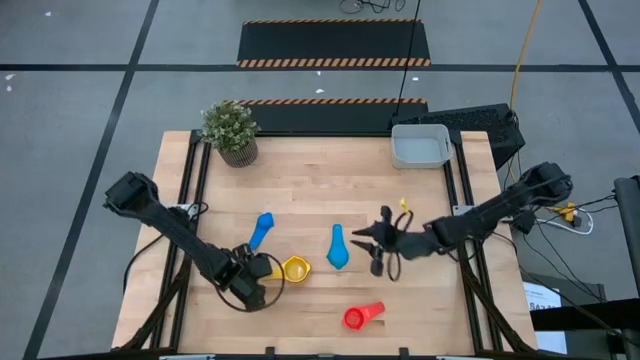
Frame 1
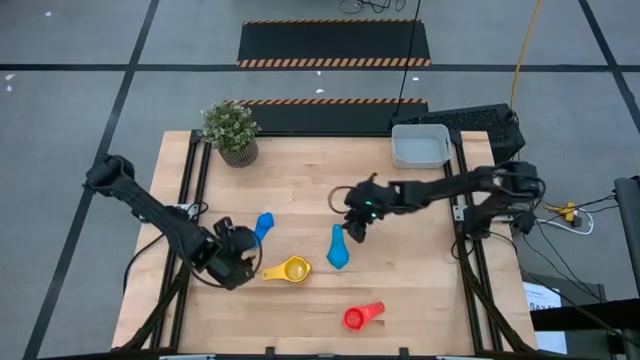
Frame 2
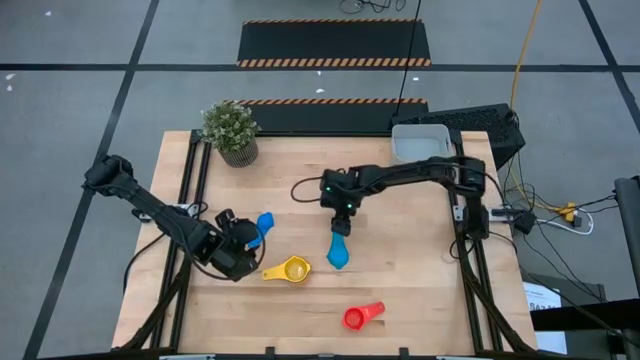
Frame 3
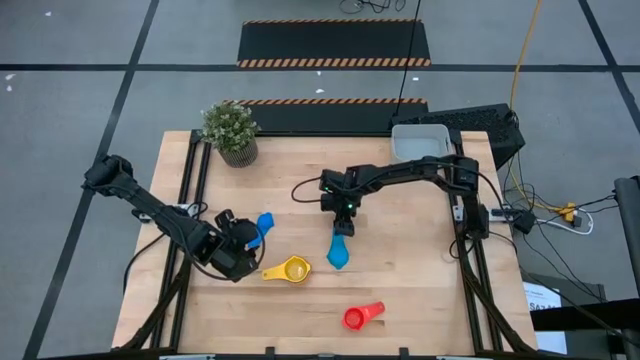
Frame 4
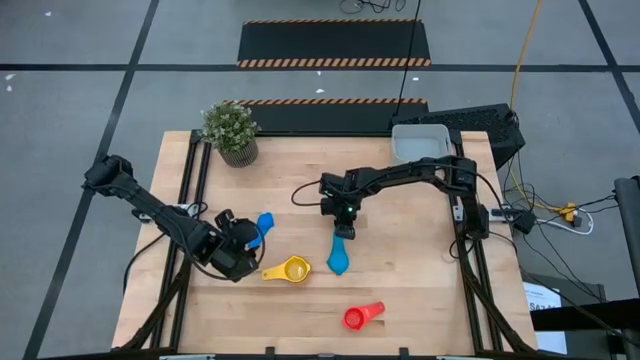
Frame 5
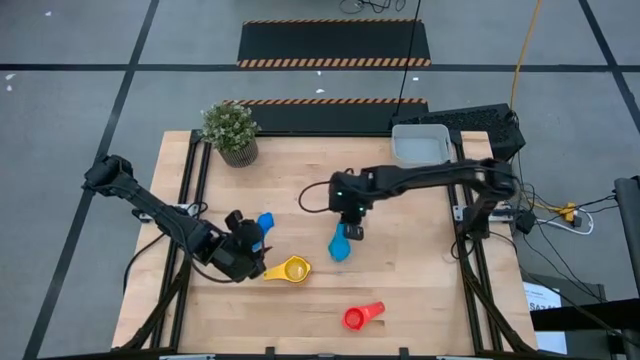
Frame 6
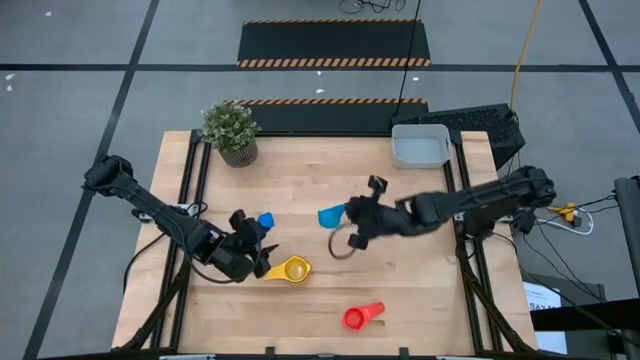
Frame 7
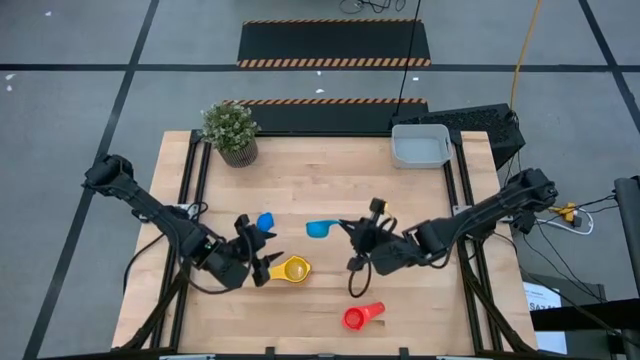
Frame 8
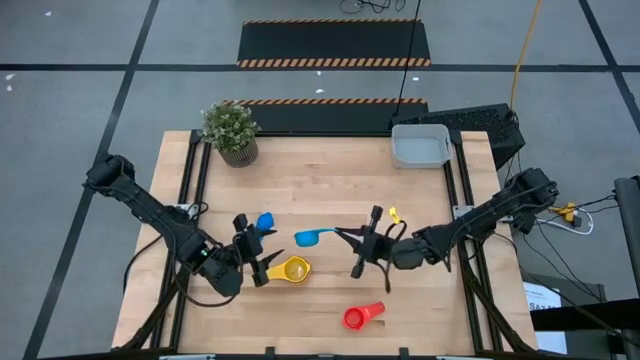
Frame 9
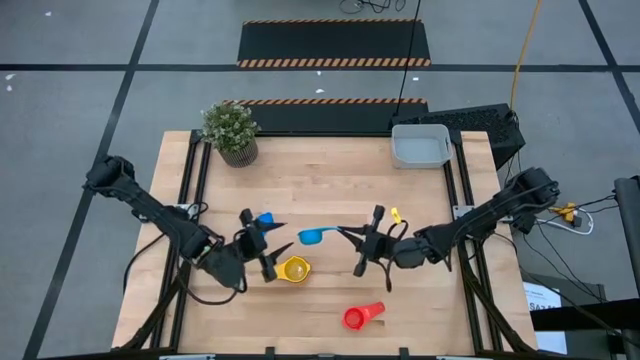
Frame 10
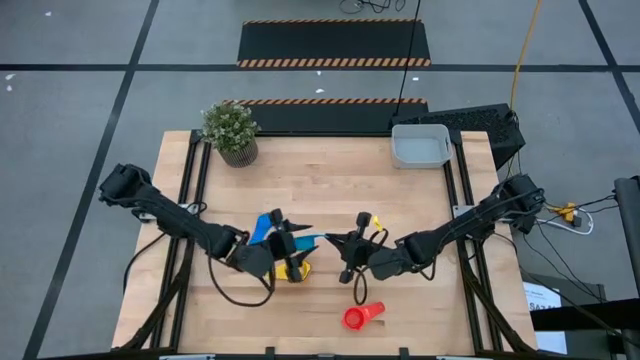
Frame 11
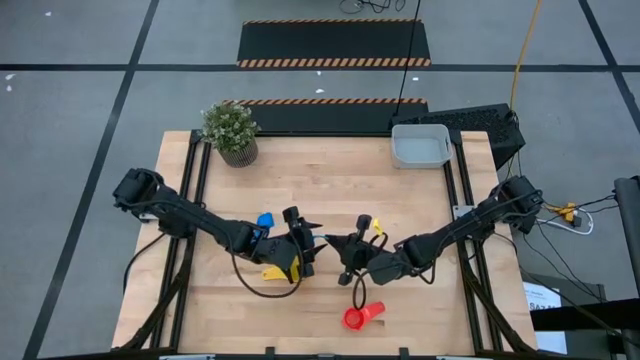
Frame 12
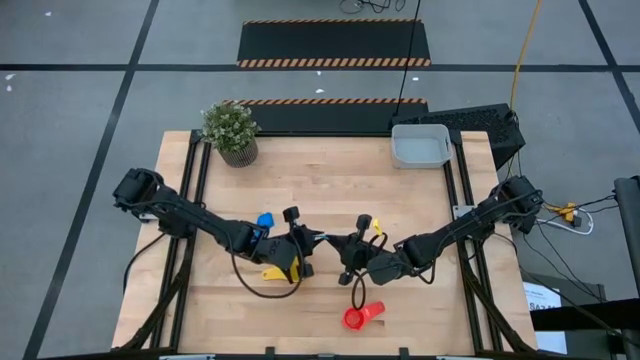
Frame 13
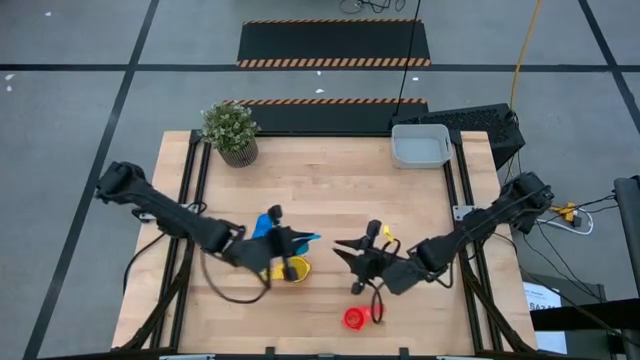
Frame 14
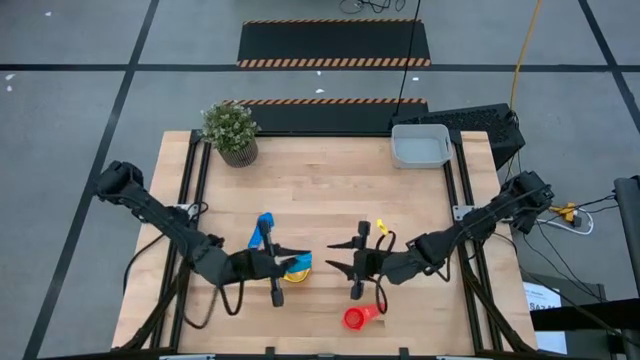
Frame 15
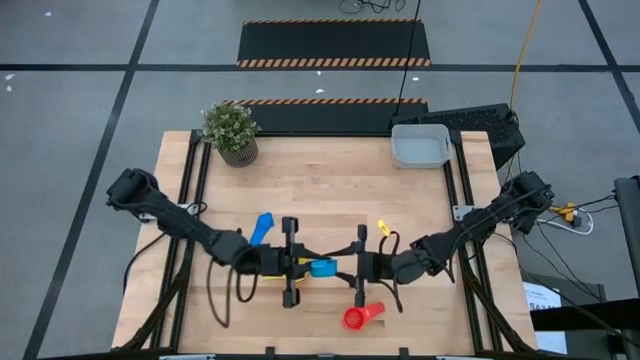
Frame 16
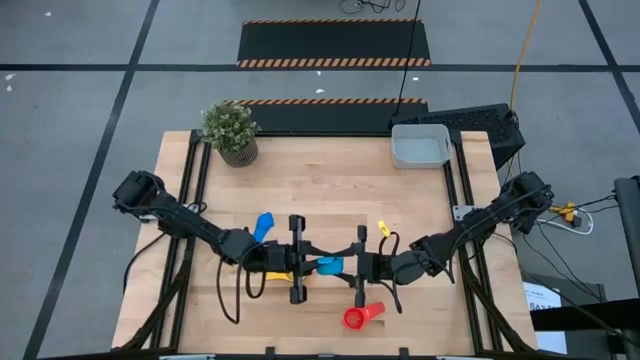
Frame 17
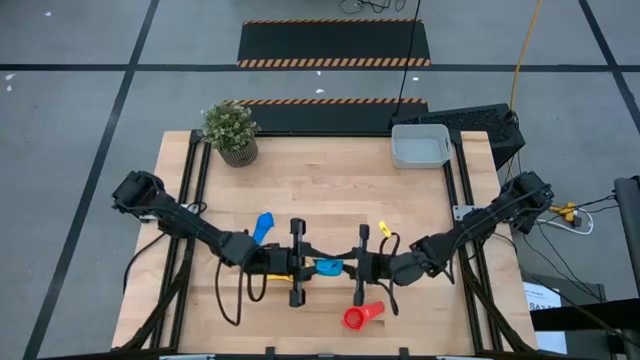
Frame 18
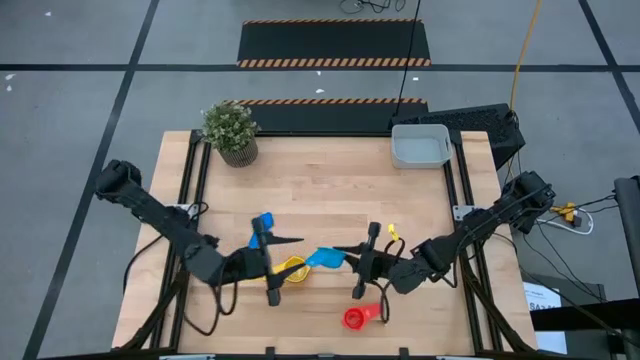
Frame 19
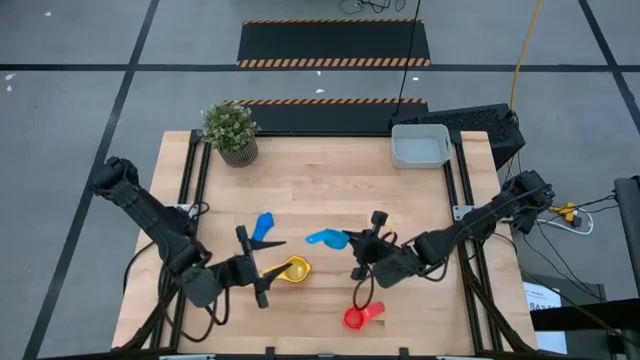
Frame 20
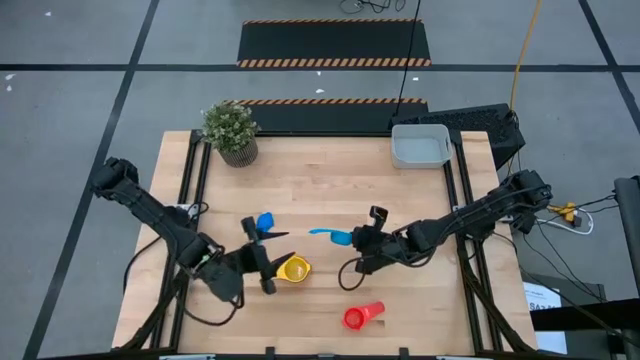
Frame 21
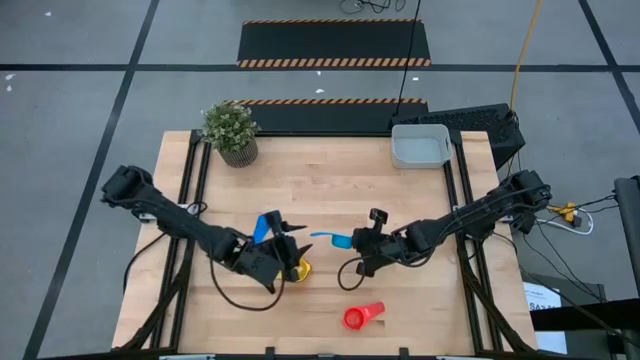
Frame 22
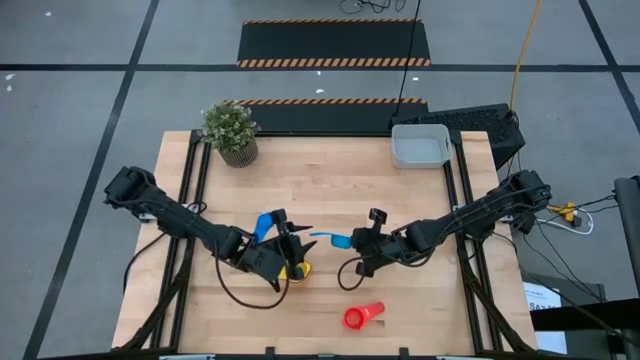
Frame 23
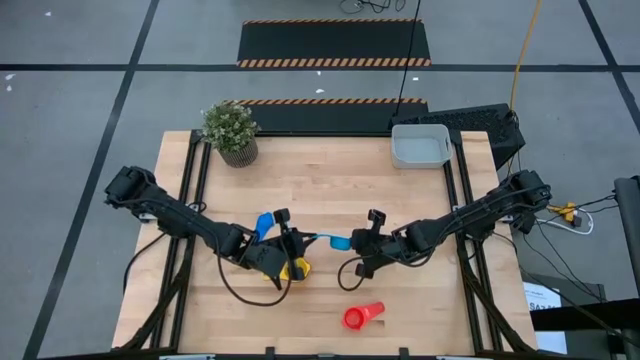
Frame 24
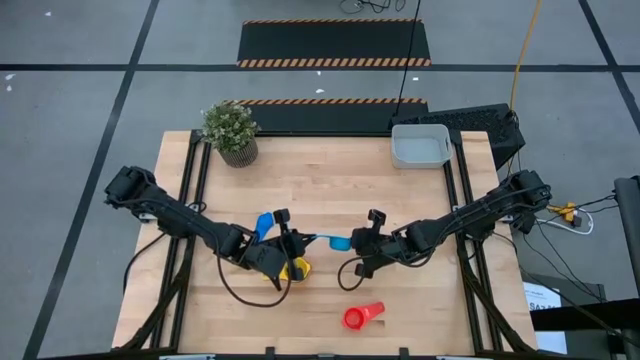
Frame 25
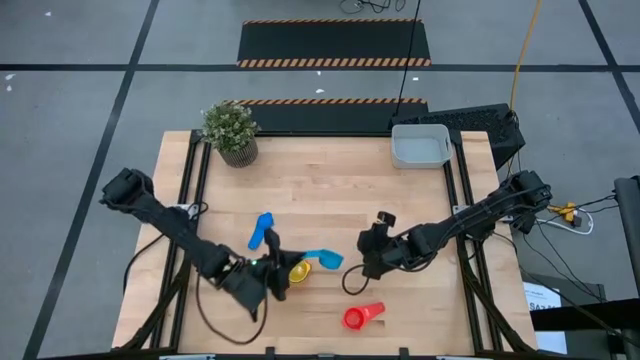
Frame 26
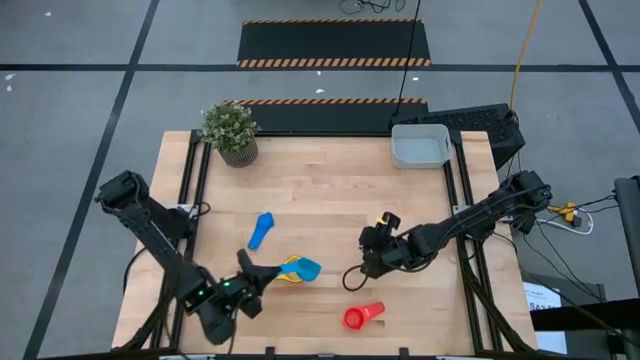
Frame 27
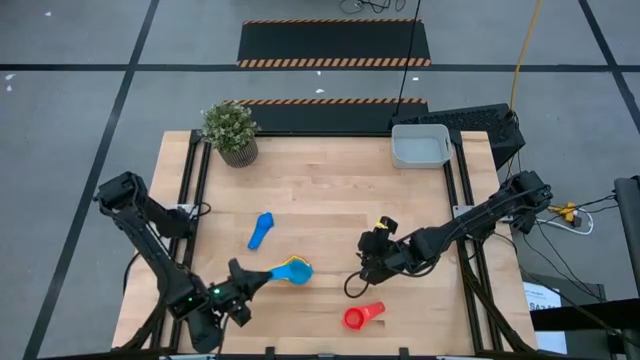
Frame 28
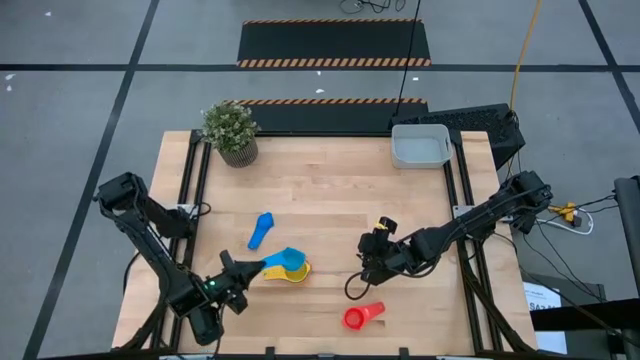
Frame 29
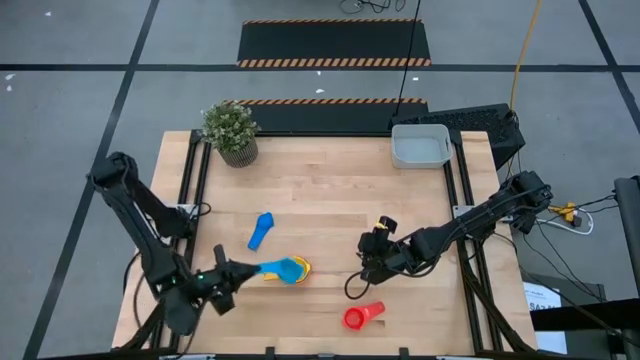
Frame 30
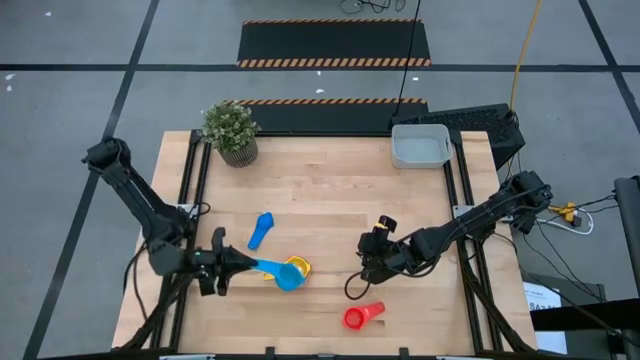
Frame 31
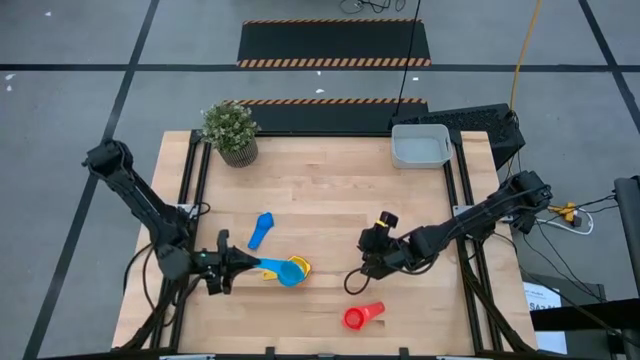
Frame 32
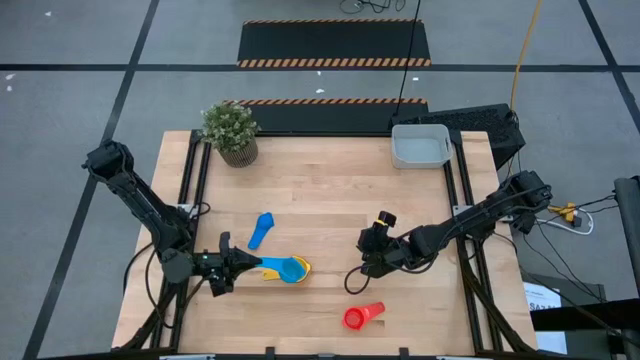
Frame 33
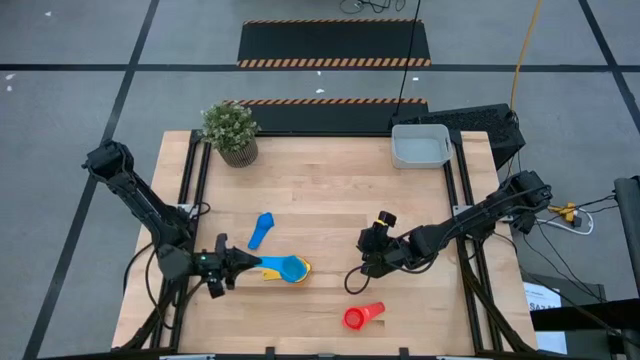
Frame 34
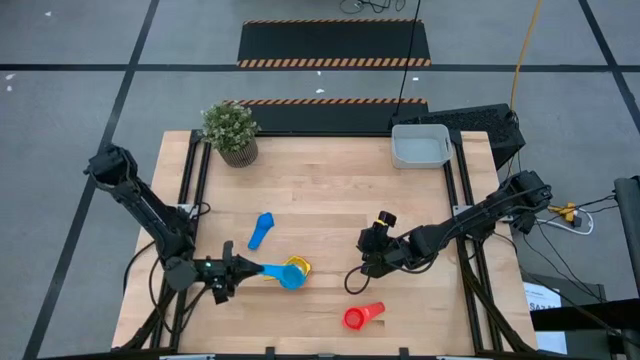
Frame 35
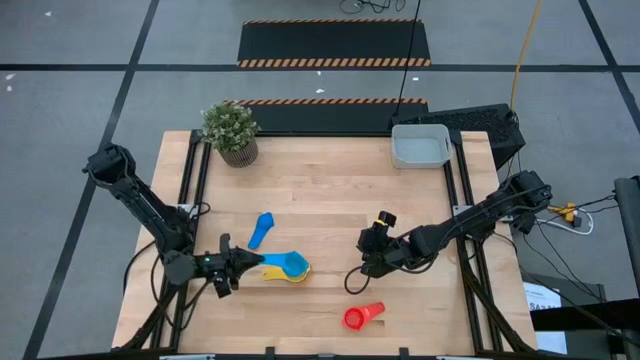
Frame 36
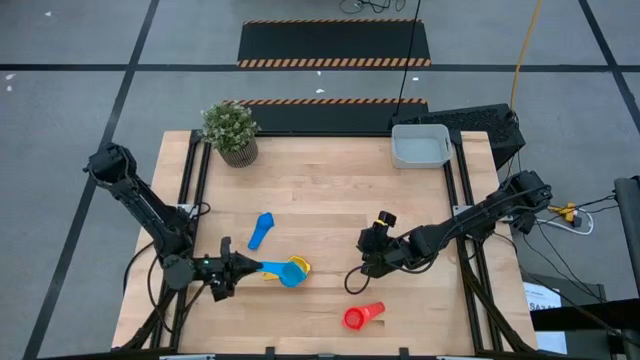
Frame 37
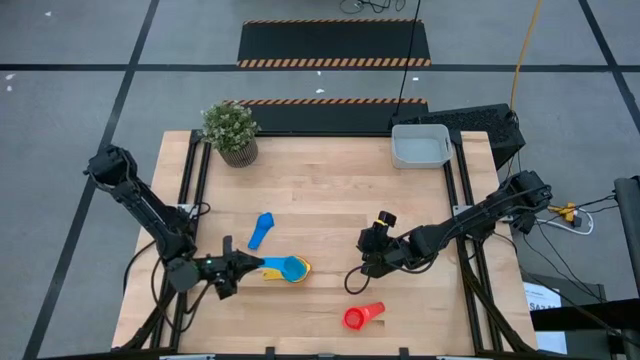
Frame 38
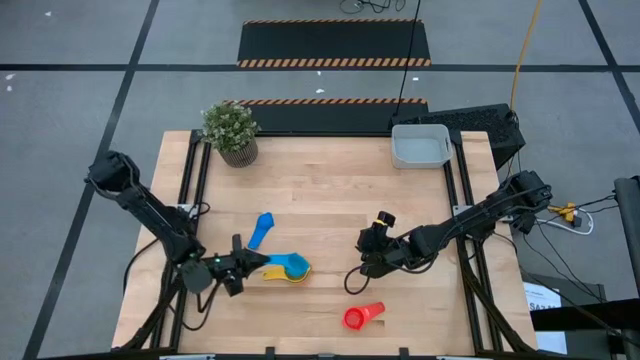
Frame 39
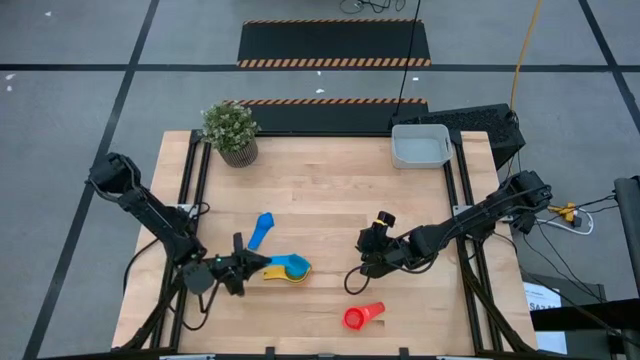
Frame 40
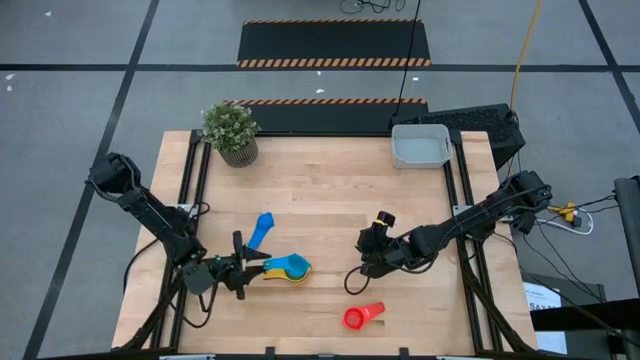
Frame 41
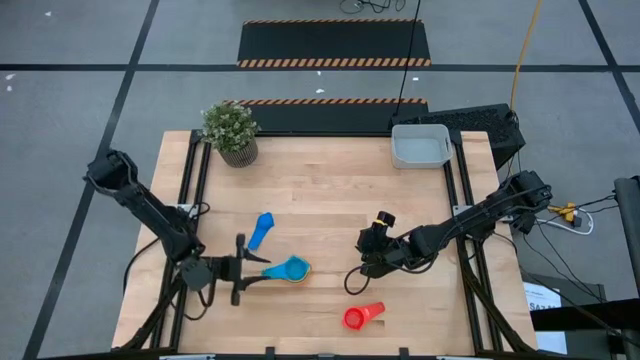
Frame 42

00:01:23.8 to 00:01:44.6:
Task: Nest measuring cups in basket
Stack the right light blue measuring cup on the yellow measuring cup

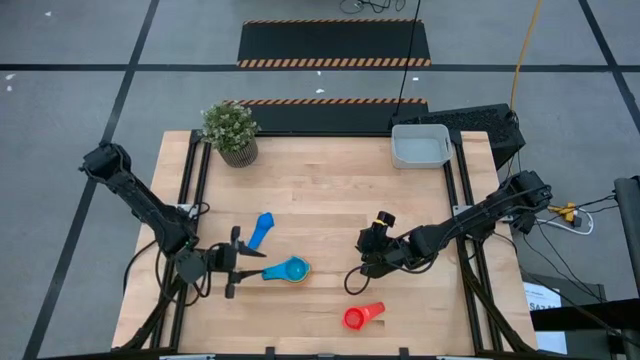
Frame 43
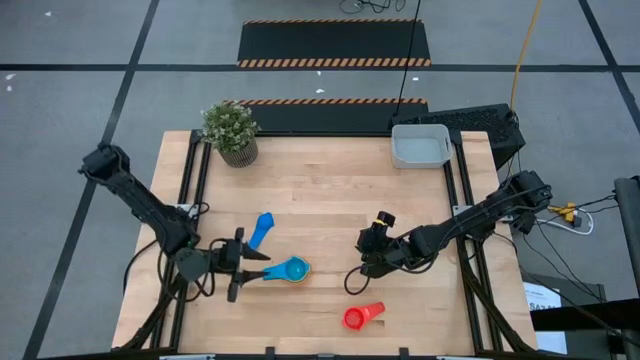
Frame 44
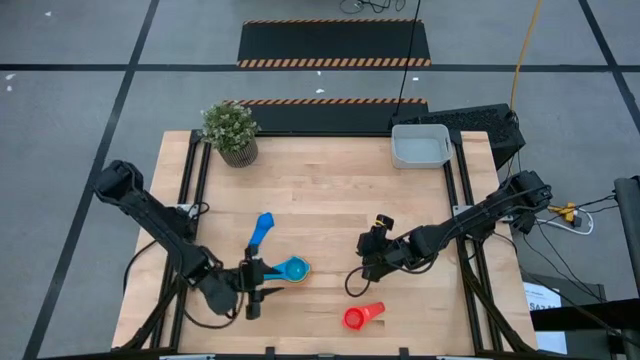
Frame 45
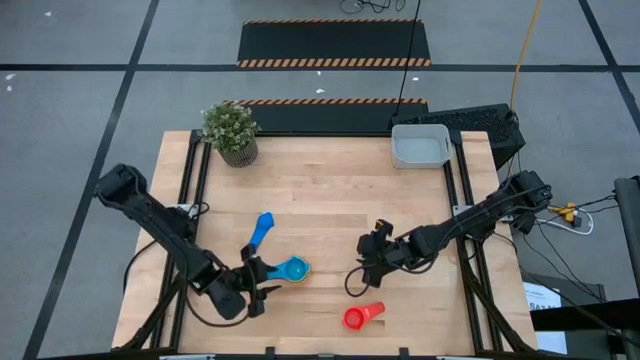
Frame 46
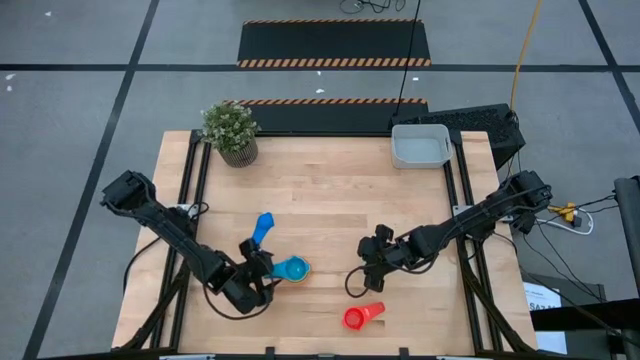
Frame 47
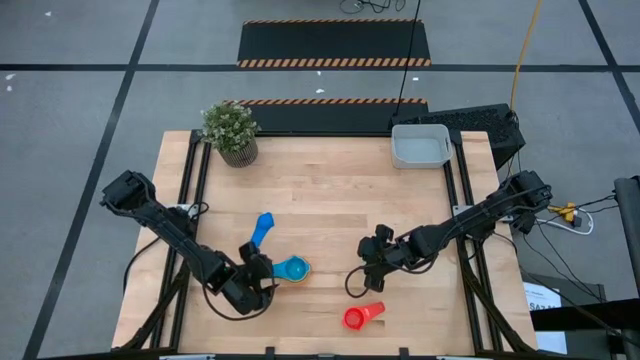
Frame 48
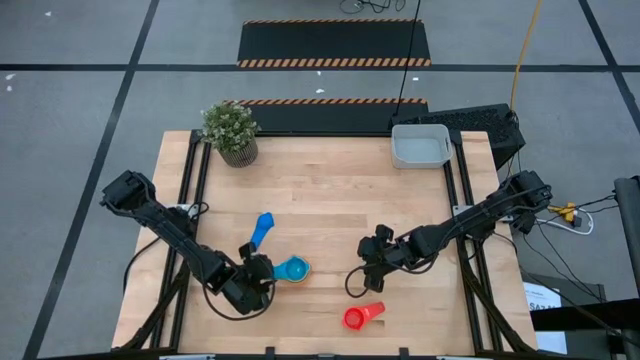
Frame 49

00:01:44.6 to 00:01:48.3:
Adjust the stacked measuring cup on the table
